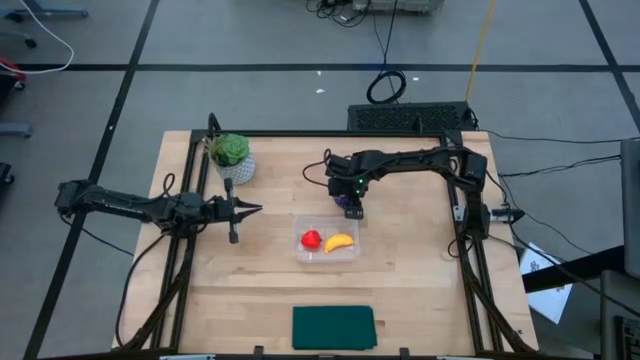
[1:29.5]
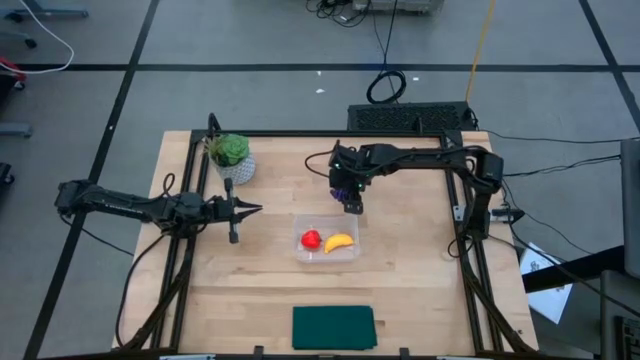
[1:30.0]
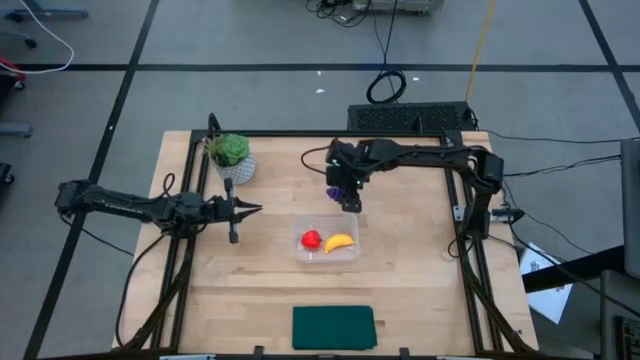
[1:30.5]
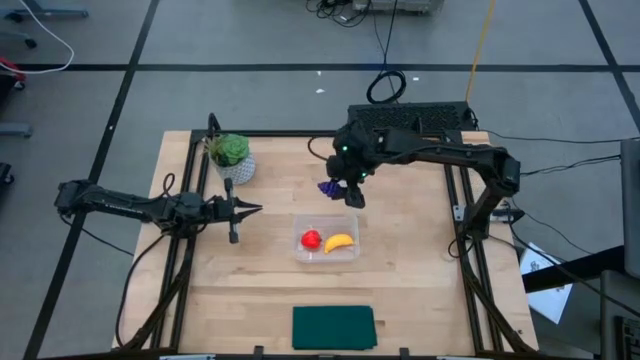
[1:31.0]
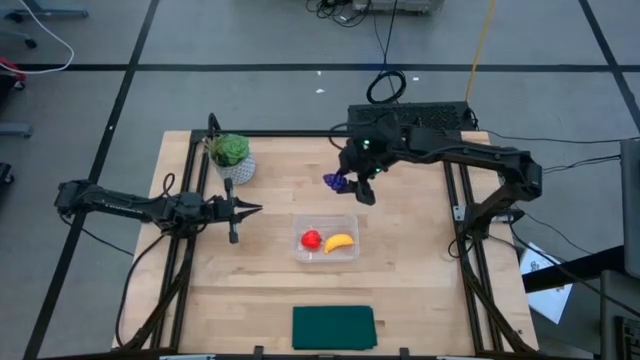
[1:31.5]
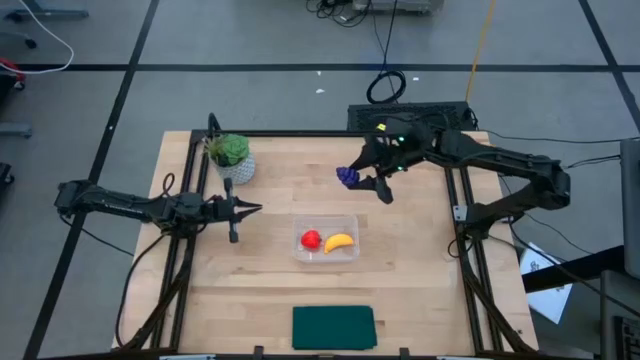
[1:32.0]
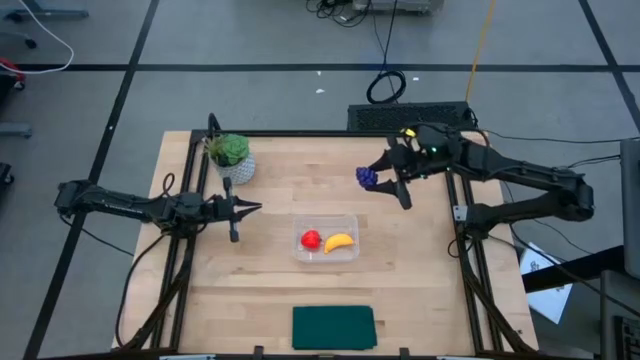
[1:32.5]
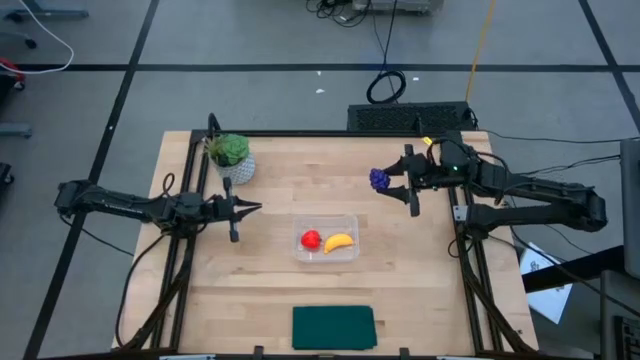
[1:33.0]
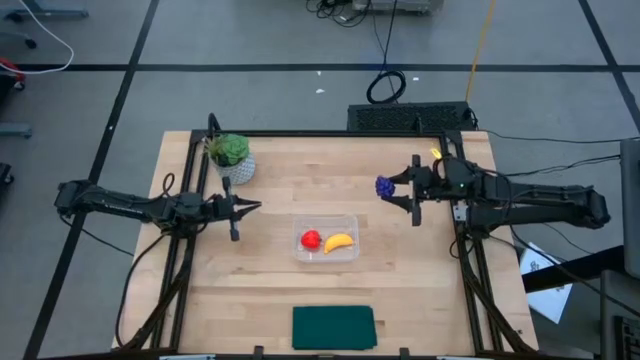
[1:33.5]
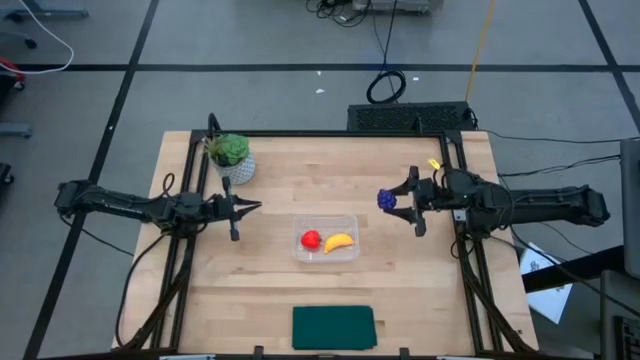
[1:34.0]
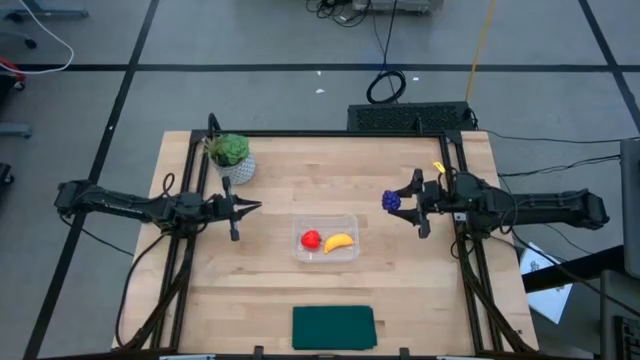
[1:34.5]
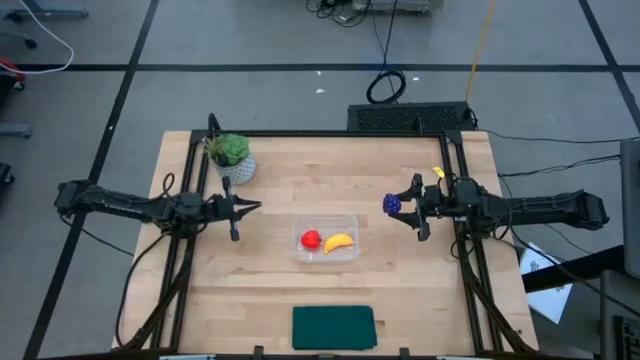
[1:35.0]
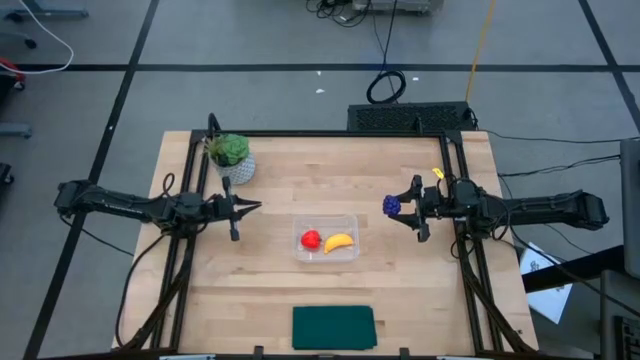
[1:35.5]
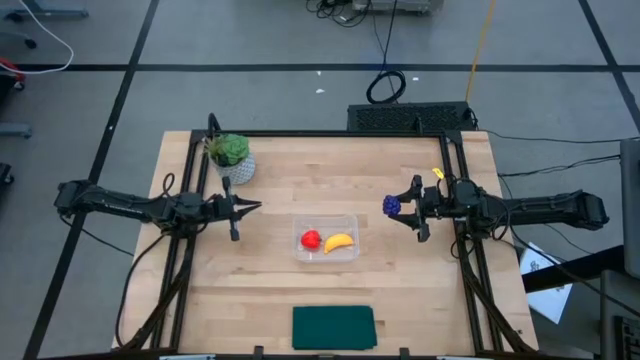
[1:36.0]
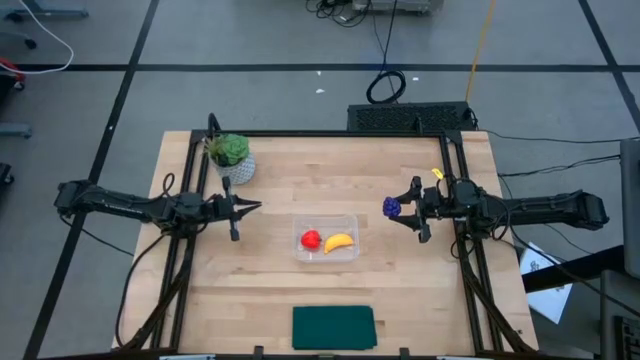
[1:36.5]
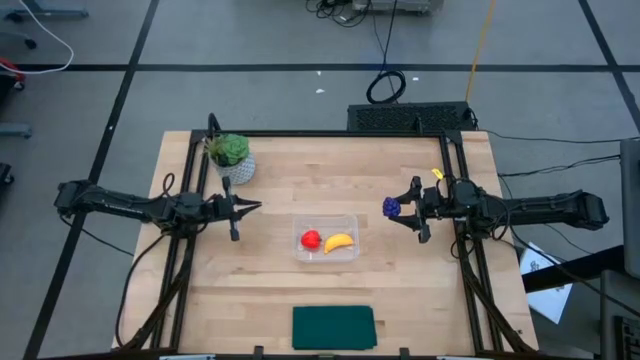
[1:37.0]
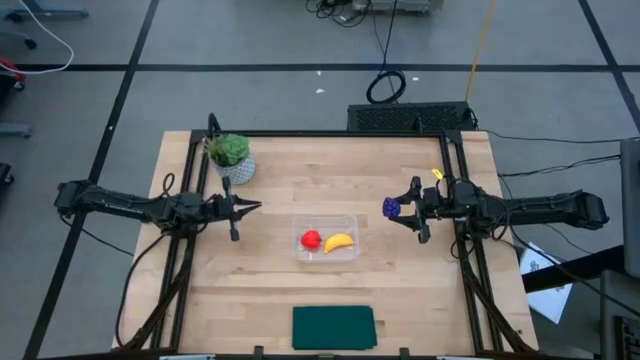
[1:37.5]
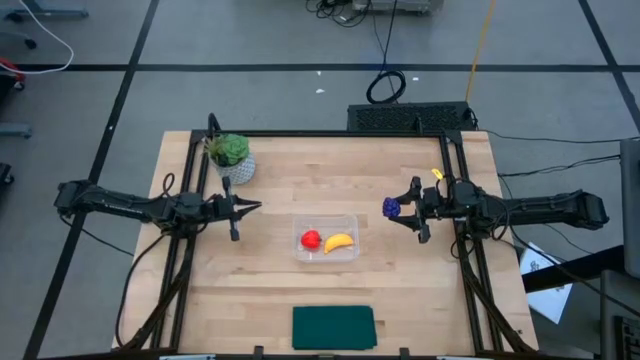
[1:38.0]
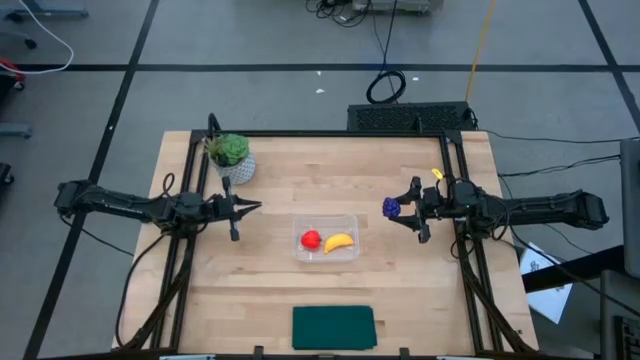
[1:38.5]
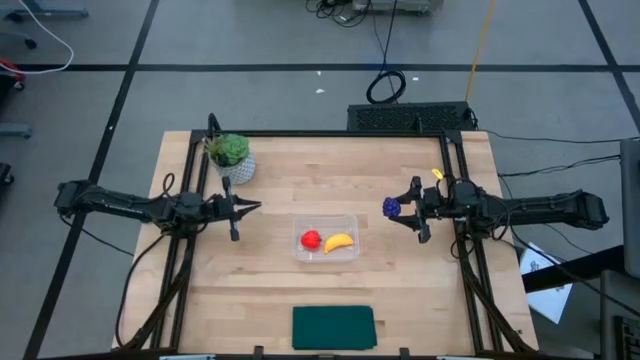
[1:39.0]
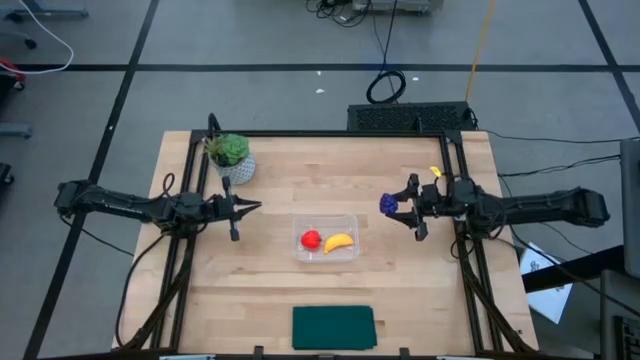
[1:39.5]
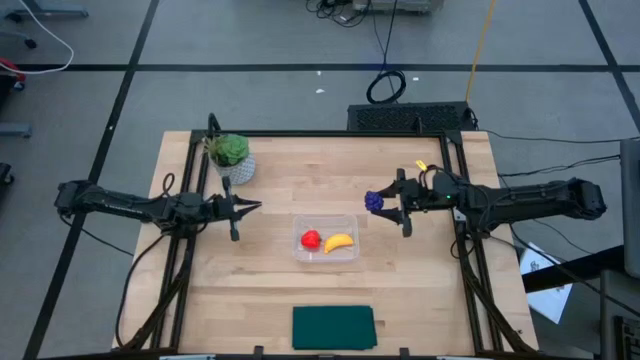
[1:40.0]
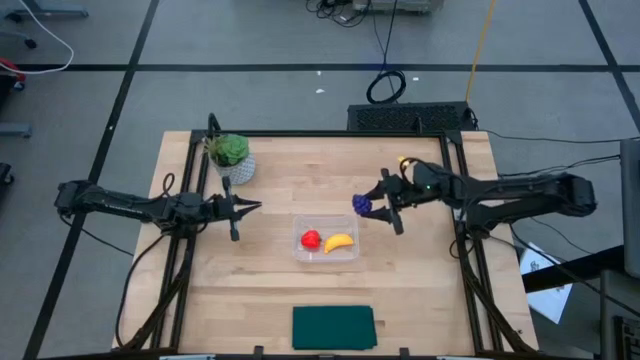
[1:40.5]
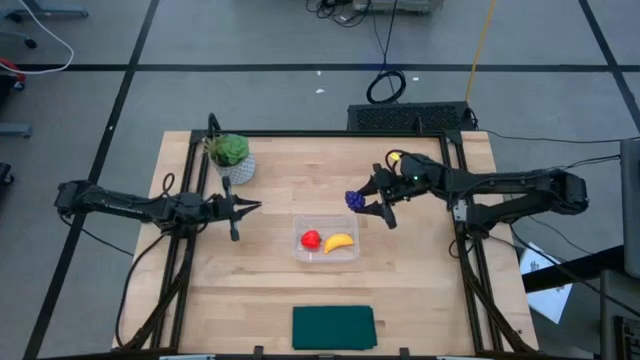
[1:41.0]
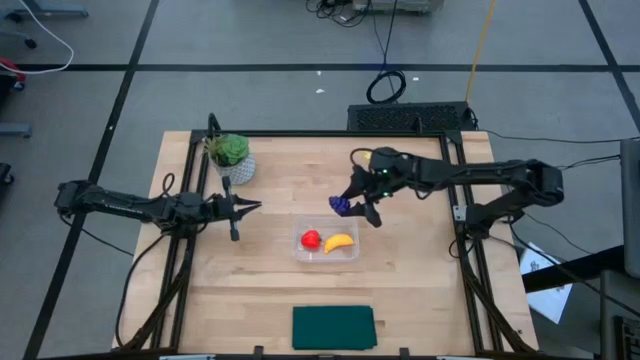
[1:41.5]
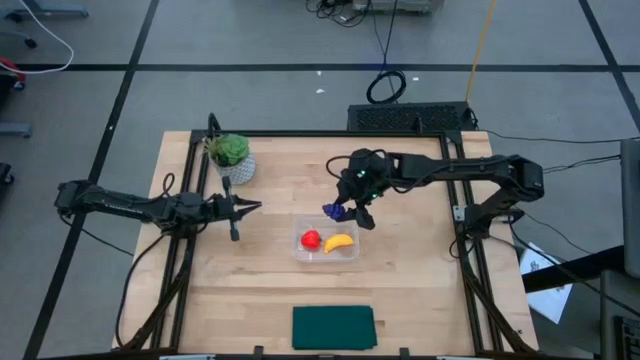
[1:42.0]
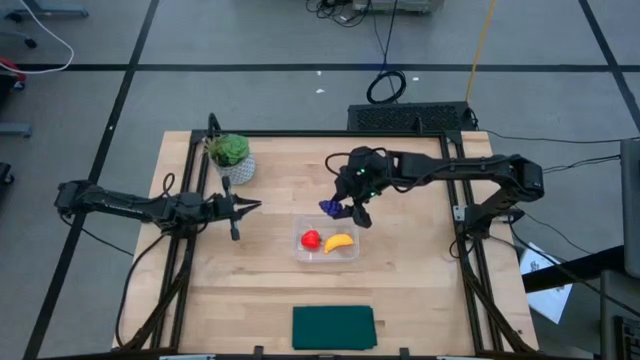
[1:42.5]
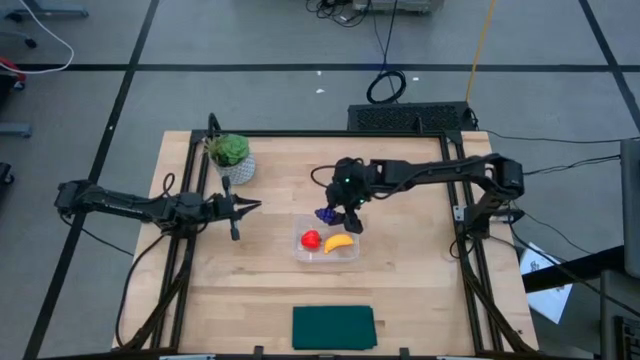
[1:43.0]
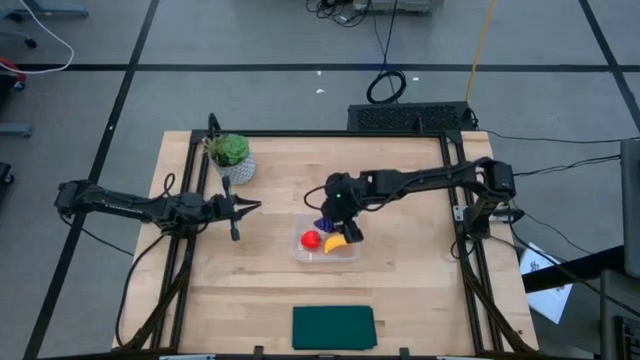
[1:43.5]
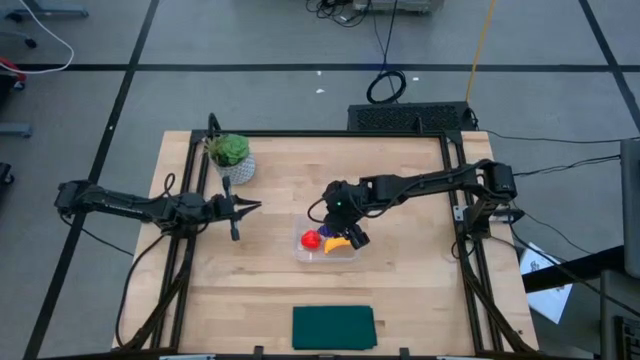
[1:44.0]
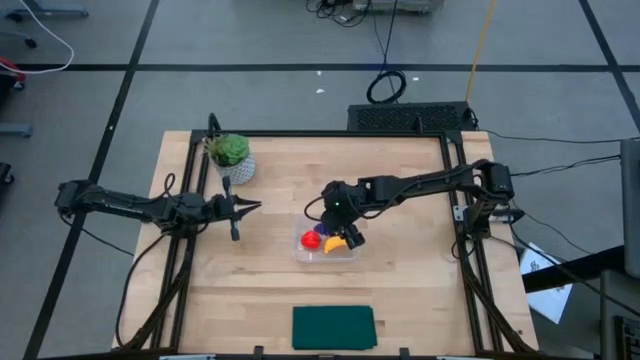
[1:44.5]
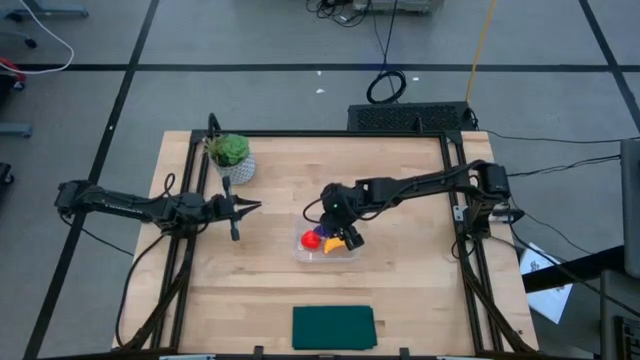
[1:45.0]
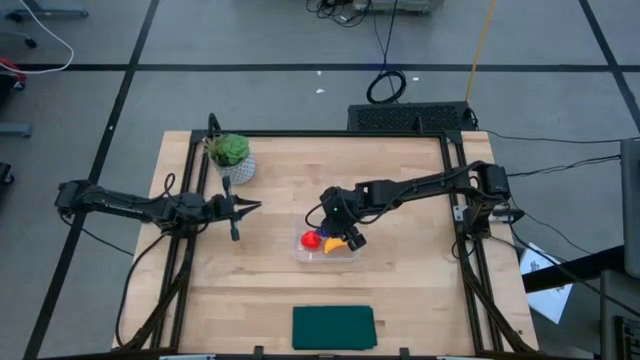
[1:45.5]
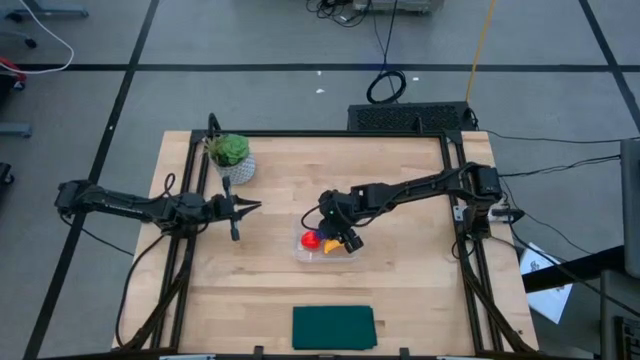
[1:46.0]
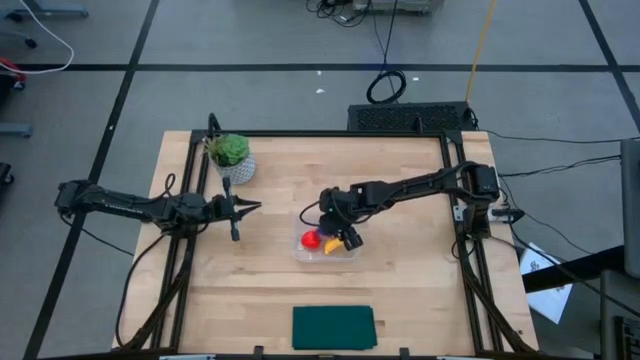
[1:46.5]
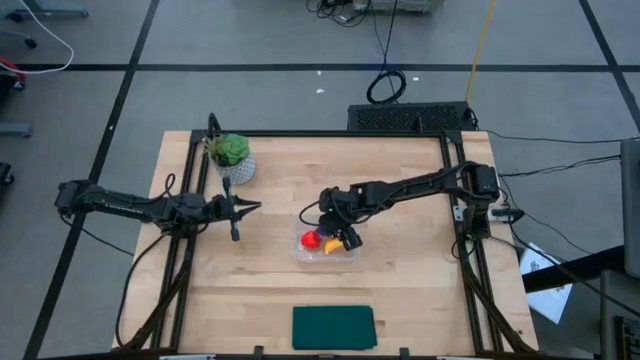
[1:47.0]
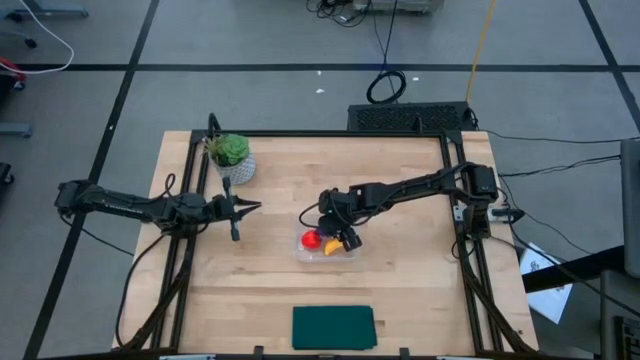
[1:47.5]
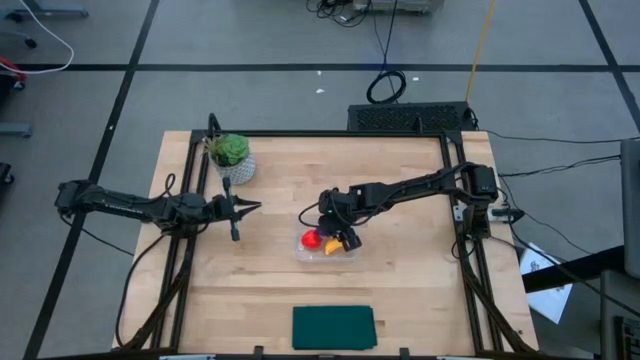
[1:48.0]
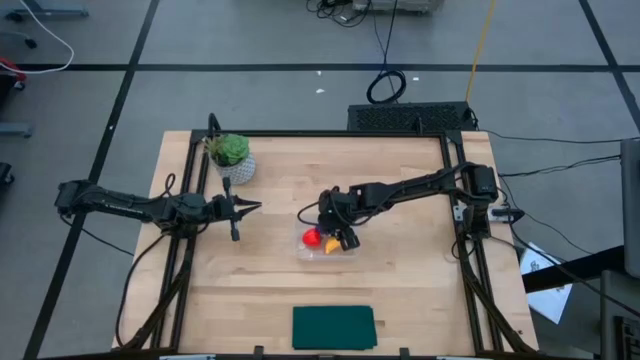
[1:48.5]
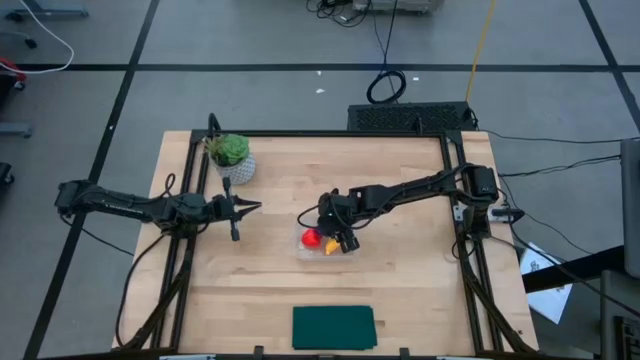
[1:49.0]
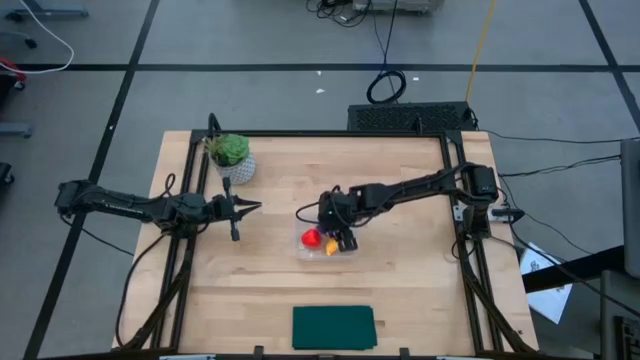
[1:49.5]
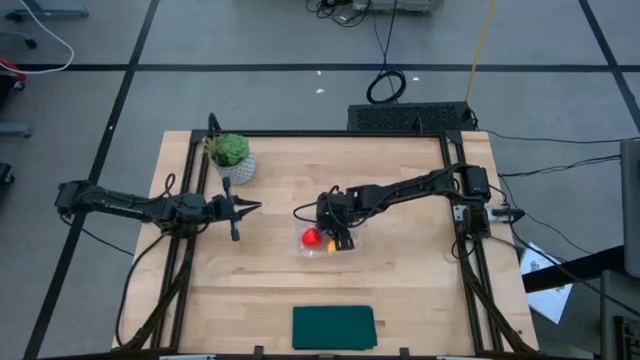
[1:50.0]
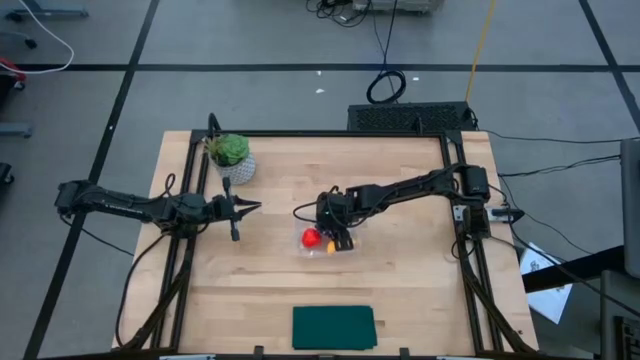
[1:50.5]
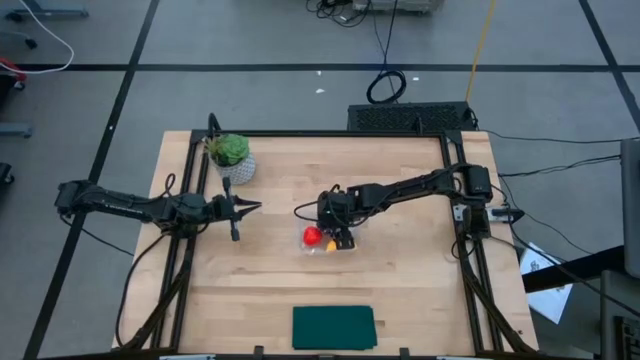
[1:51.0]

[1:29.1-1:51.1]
Task: Pick and placing Produce into tupperware
Put the black berry into transparent bin
